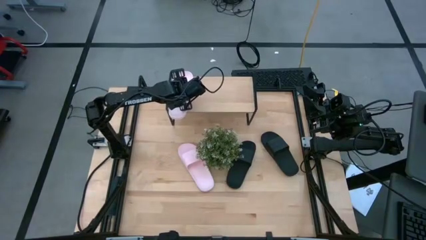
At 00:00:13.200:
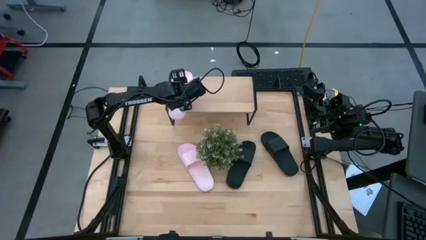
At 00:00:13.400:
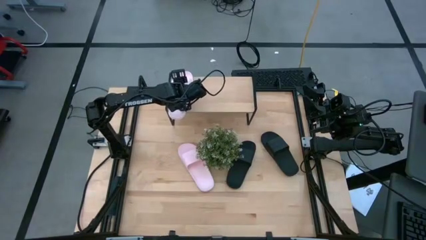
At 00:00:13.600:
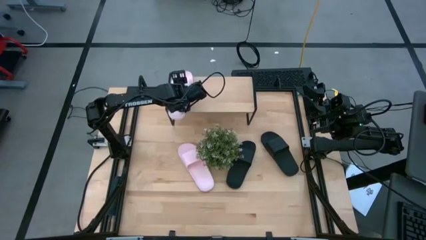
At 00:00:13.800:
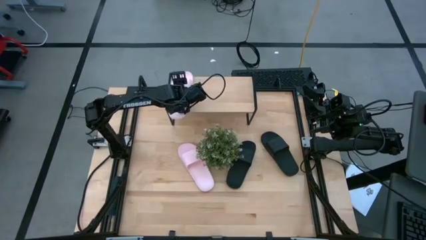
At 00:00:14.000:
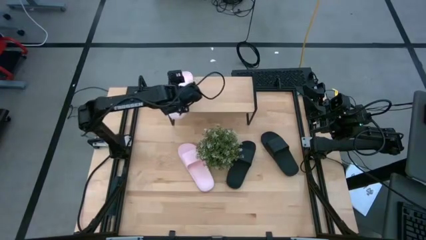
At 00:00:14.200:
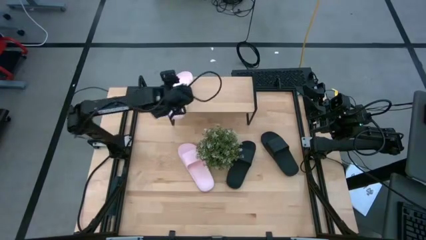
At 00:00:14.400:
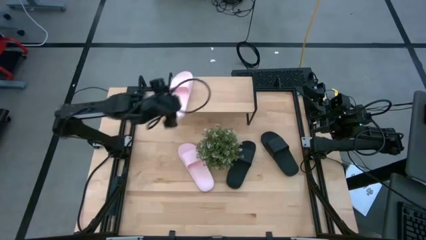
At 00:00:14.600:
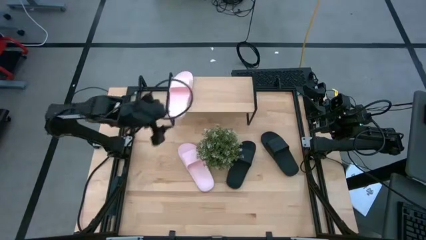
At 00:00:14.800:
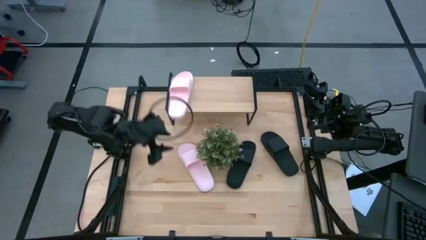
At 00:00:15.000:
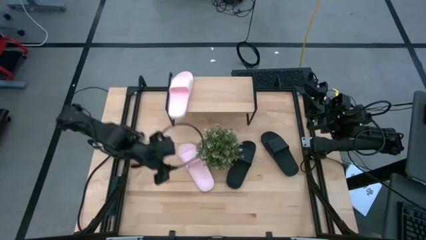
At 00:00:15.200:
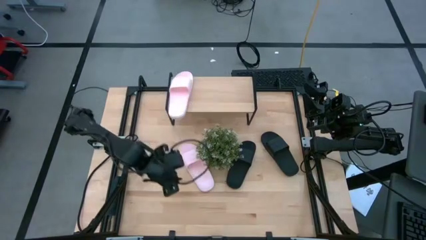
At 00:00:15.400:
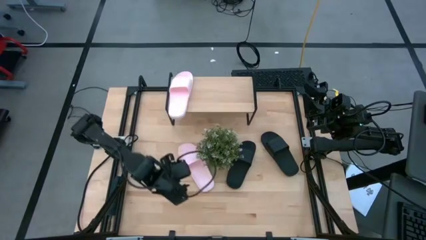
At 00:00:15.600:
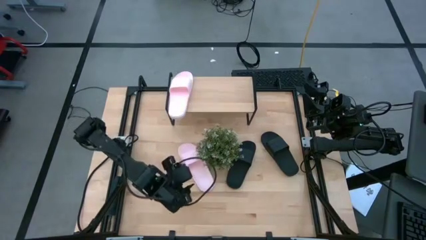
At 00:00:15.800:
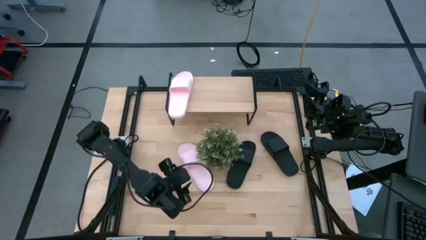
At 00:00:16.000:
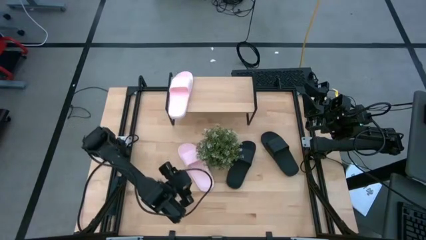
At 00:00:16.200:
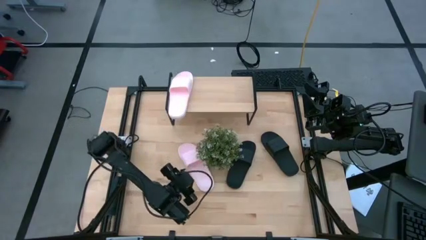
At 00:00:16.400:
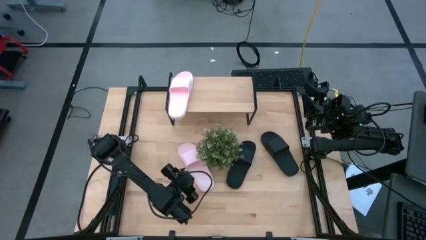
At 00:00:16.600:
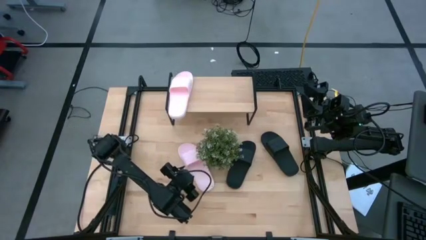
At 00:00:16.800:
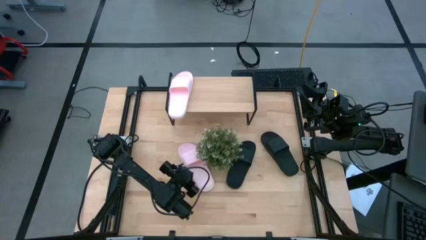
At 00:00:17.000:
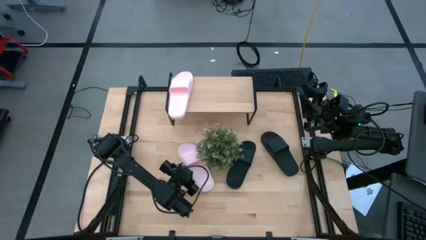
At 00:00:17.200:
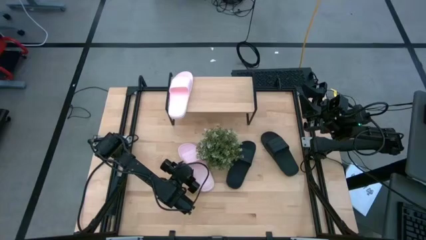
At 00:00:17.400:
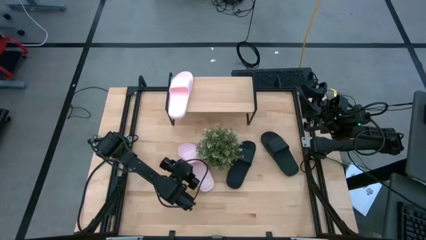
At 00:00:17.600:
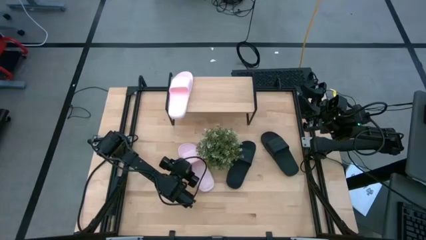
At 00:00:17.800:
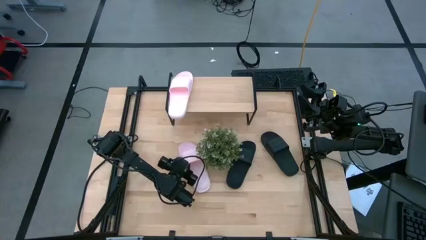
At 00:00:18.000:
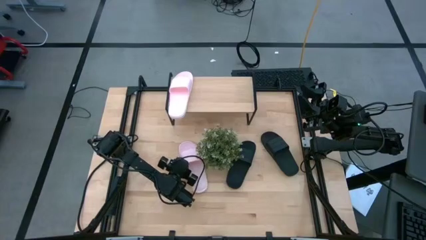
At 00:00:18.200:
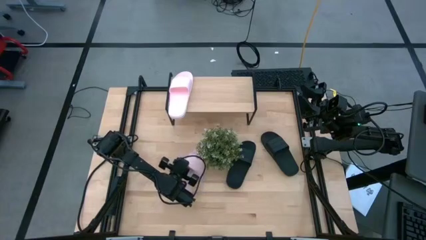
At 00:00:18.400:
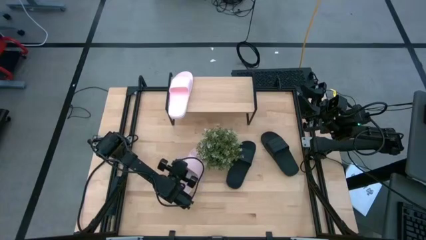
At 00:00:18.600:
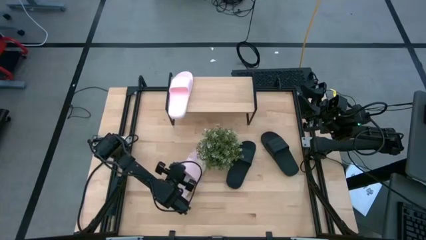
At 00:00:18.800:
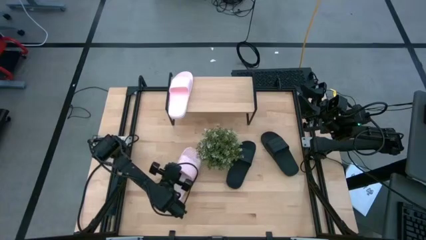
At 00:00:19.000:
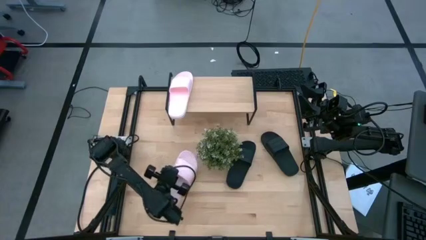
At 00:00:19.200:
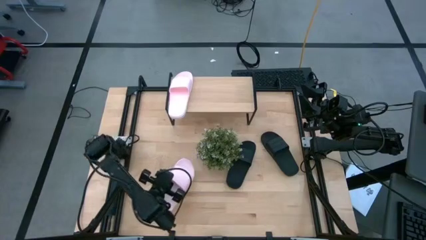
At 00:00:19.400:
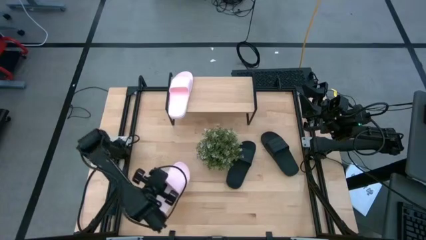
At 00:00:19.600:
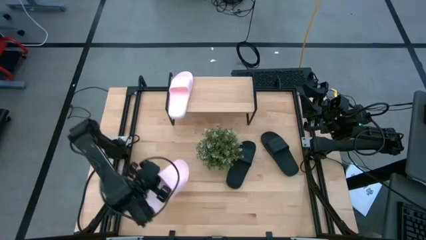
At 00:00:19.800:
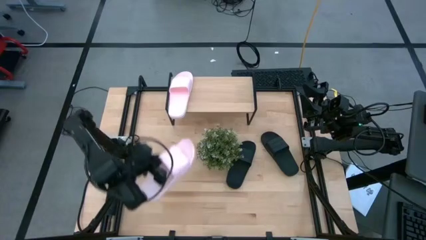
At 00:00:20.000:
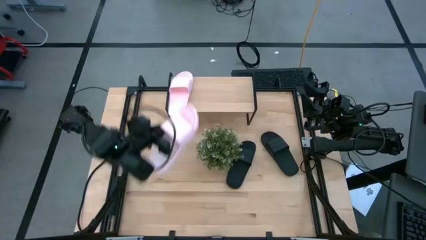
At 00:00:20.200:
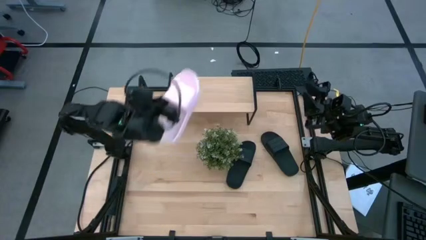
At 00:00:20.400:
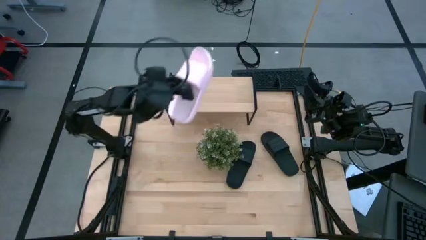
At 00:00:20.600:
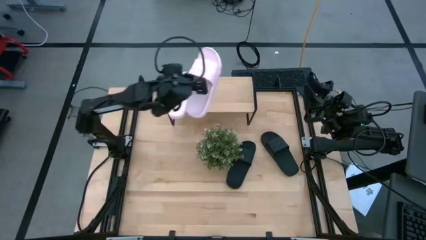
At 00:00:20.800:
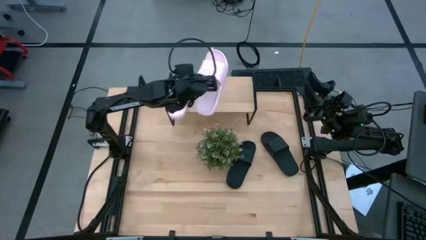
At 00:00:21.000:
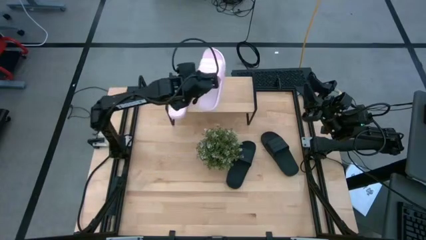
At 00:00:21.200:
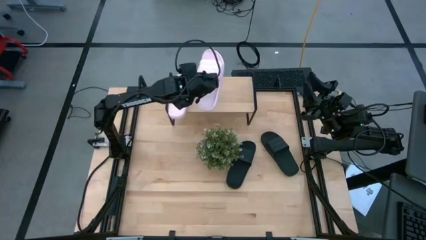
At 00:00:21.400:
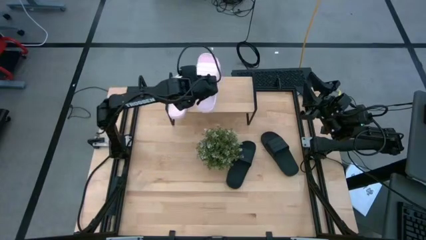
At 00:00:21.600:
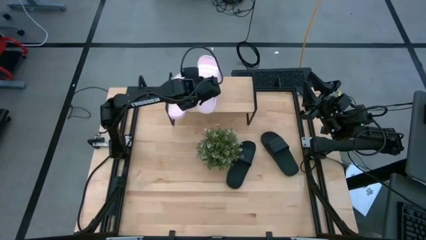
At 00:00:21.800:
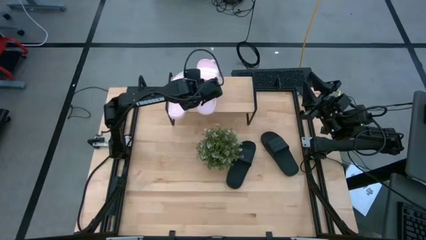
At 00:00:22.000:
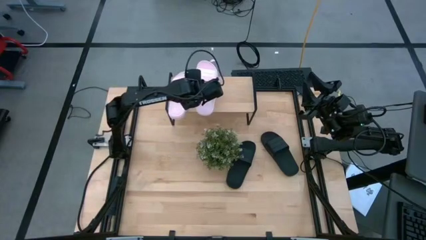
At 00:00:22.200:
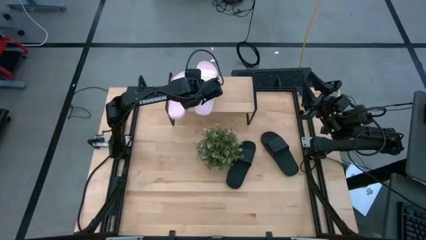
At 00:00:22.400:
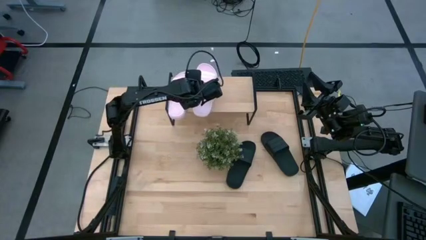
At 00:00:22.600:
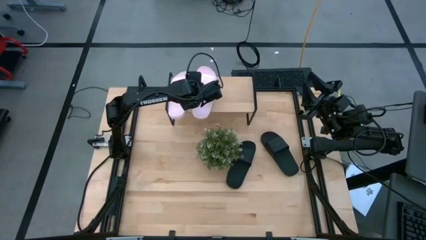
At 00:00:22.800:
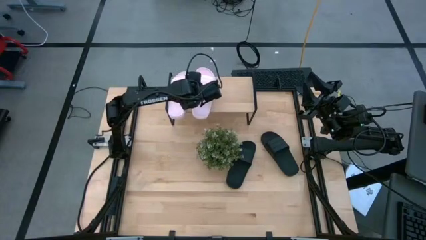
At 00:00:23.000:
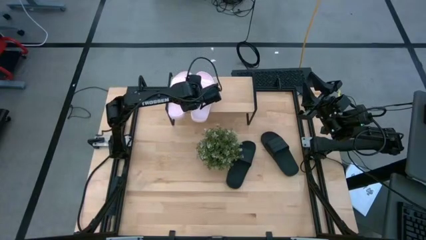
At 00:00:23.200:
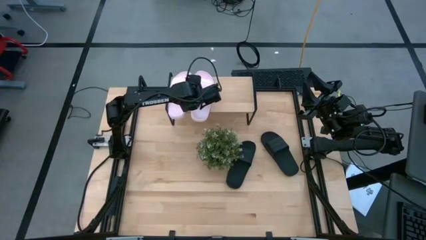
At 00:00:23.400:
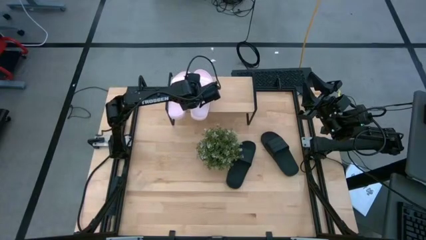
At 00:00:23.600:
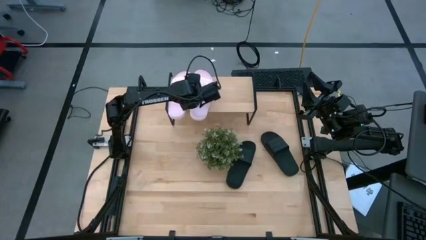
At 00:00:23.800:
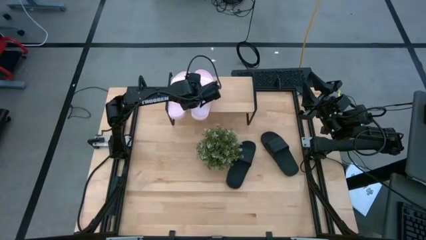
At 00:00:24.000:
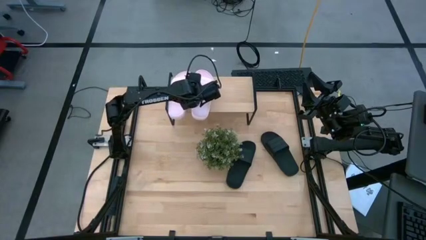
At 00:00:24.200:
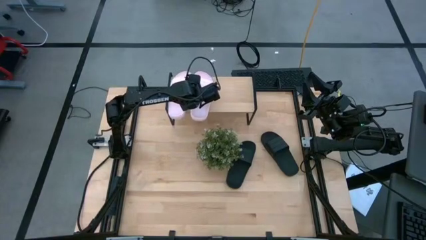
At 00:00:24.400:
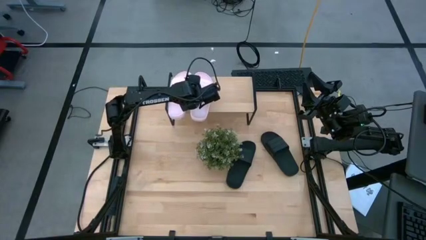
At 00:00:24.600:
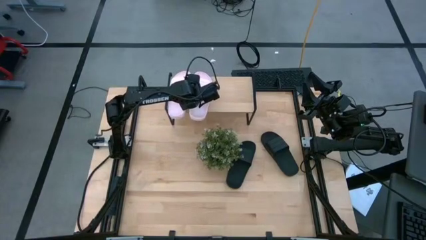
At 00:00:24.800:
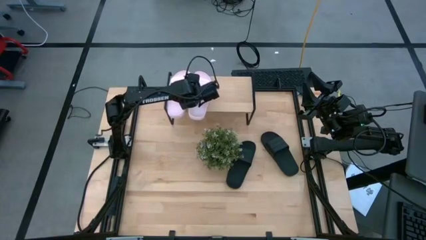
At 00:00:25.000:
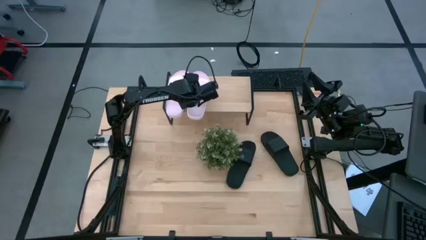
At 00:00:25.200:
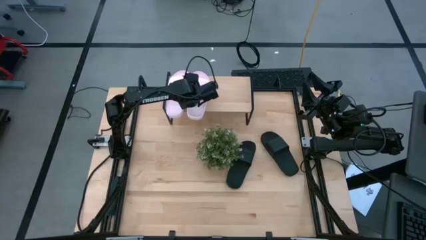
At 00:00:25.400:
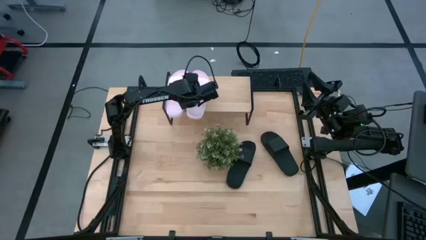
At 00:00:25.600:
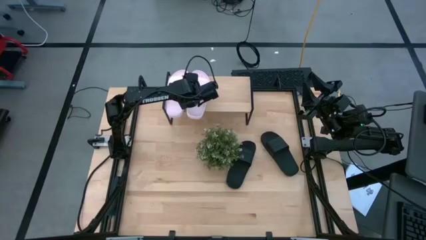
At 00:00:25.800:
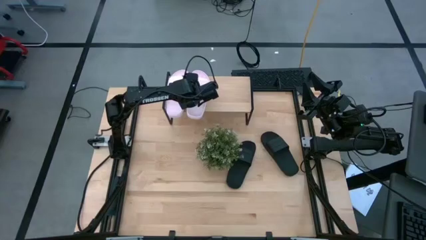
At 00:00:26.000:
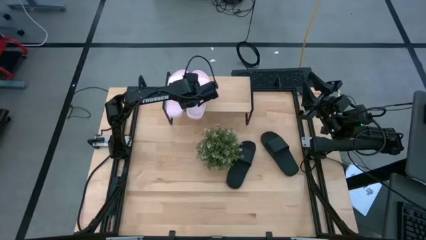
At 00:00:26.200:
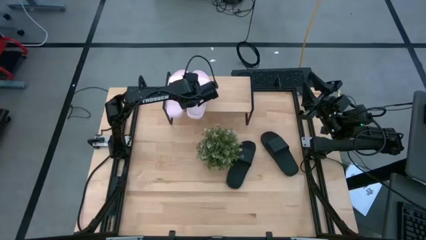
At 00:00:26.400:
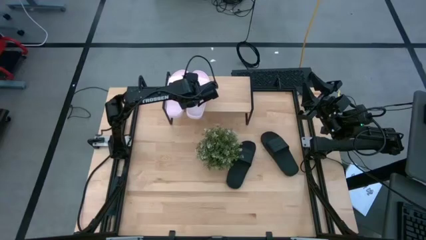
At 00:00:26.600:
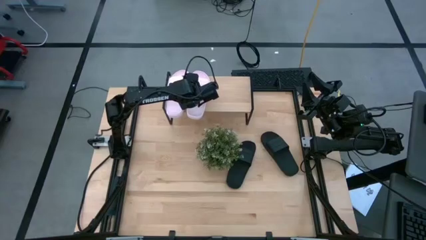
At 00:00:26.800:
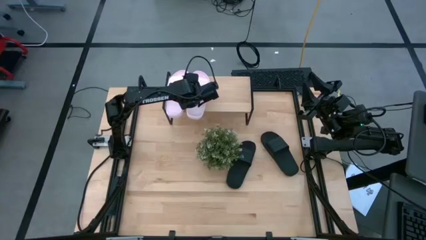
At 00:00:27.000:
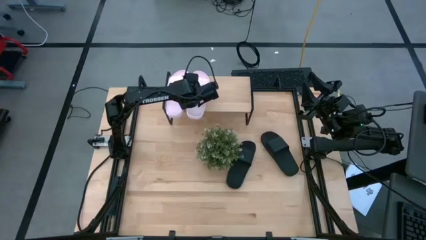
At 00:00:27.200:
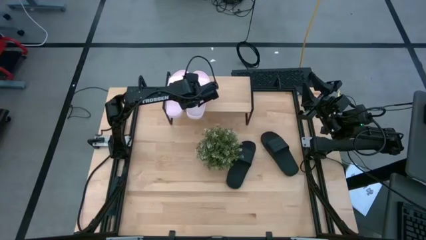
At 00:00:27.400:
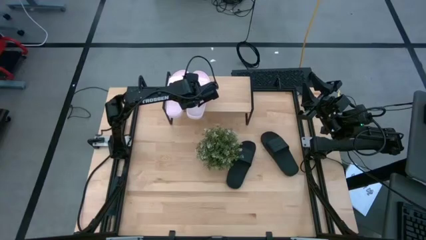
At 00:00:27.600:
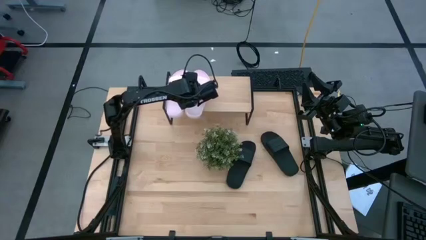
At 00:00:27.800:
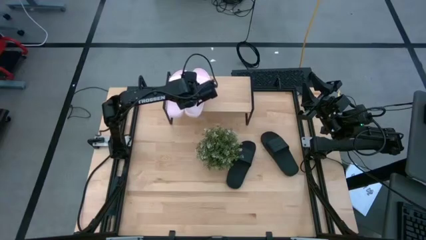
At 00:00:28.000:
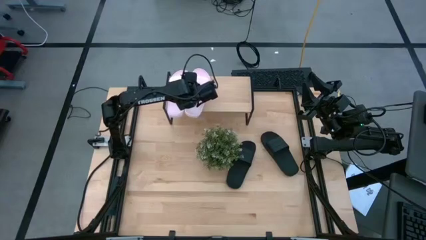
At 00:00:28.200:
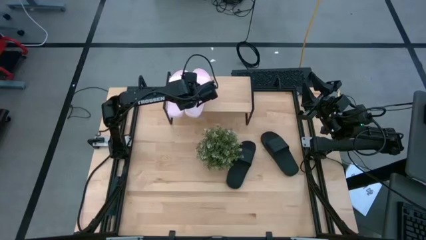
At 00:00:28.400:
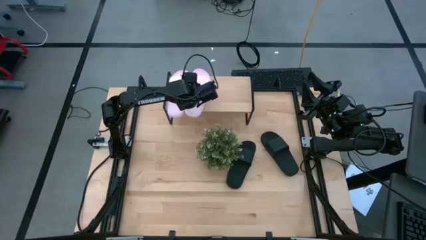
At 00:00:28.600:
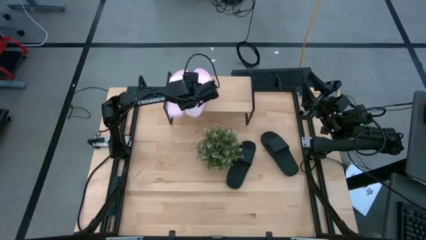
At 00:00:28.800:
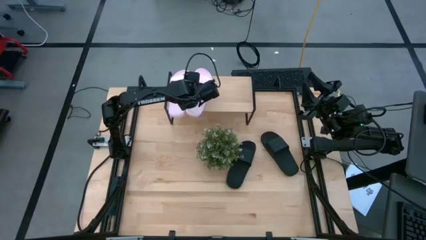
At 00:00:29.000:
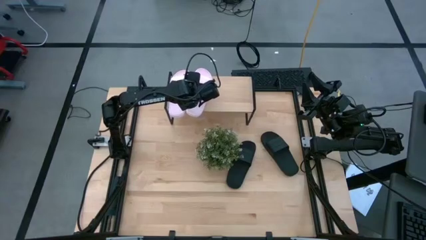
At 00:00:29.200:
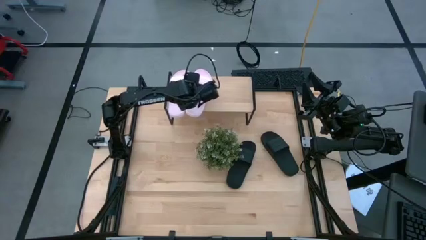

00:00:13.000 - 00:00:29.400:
Task: Pick and place slides into the shelf
Put the pink slides on the shelf
